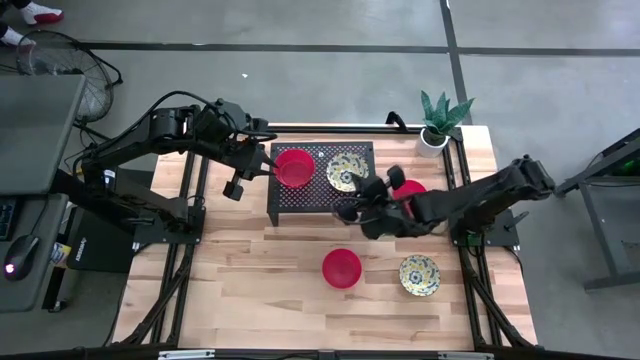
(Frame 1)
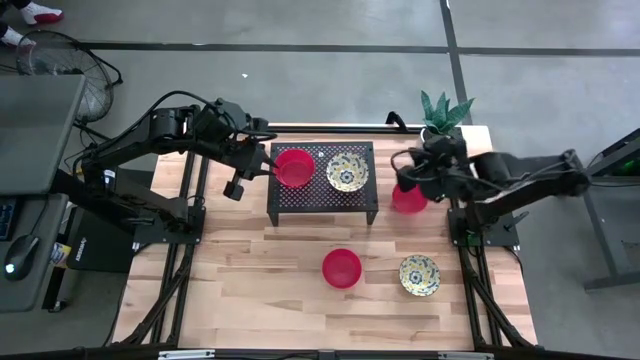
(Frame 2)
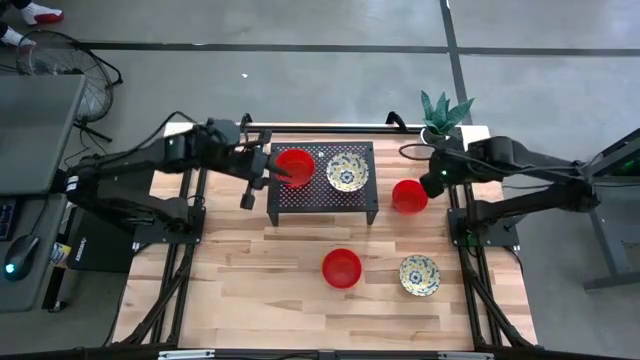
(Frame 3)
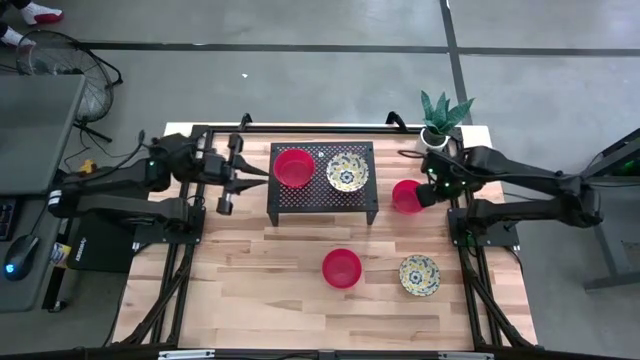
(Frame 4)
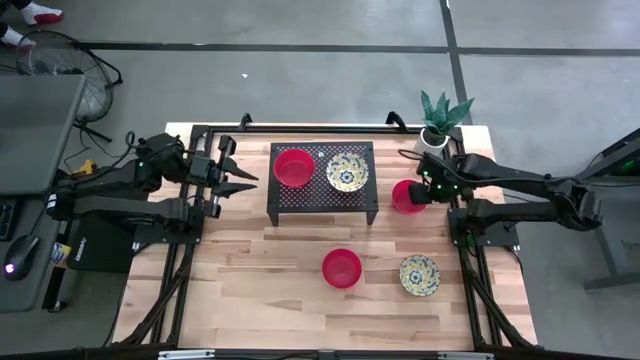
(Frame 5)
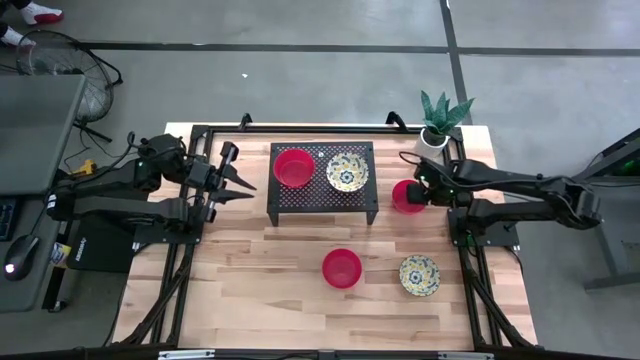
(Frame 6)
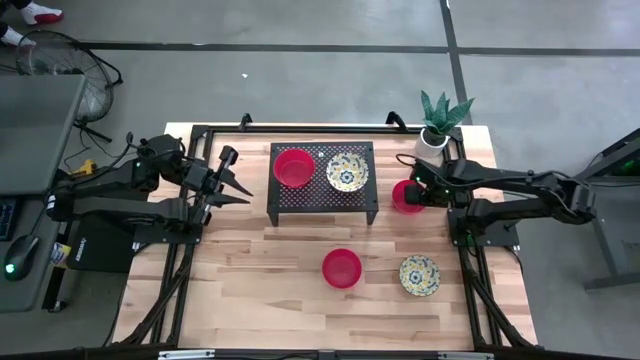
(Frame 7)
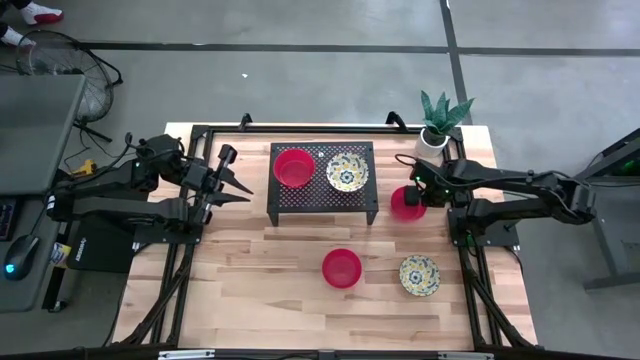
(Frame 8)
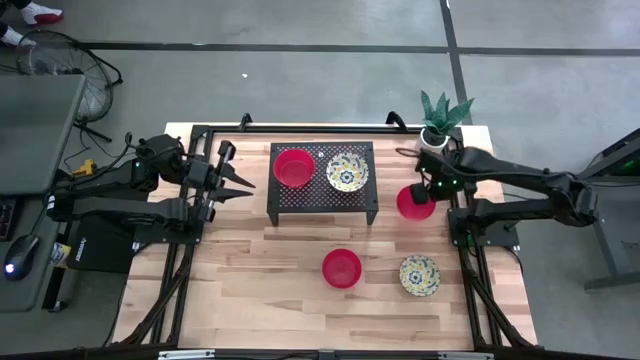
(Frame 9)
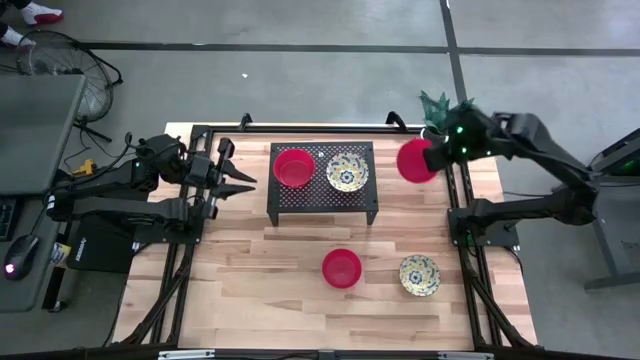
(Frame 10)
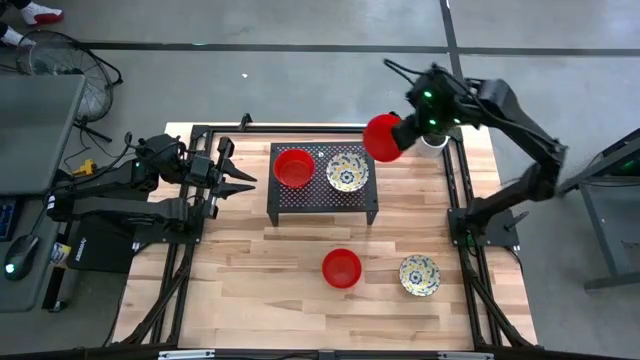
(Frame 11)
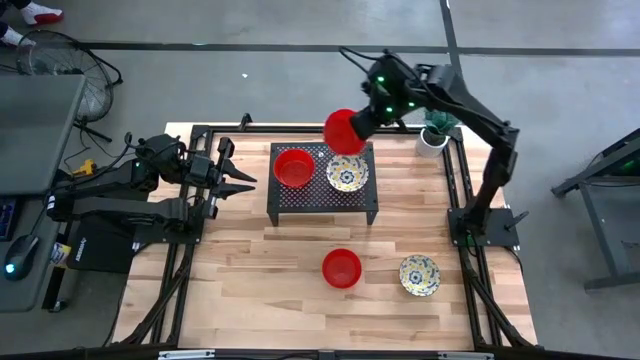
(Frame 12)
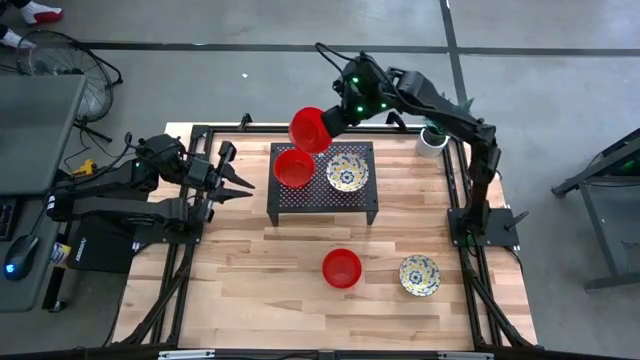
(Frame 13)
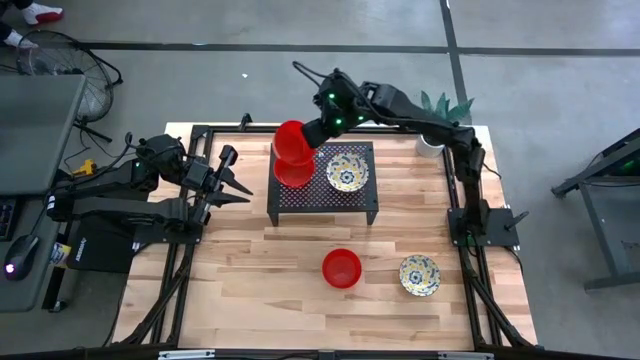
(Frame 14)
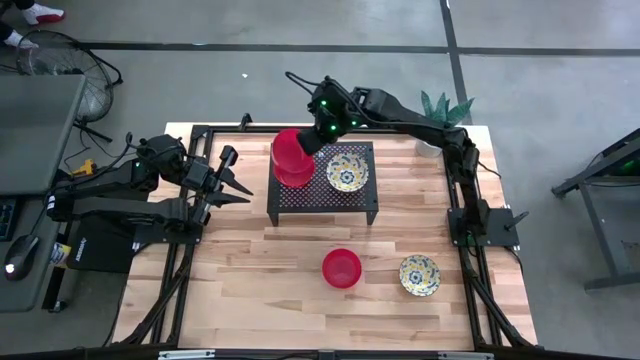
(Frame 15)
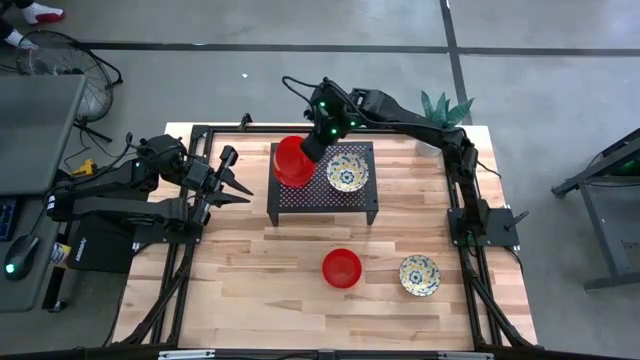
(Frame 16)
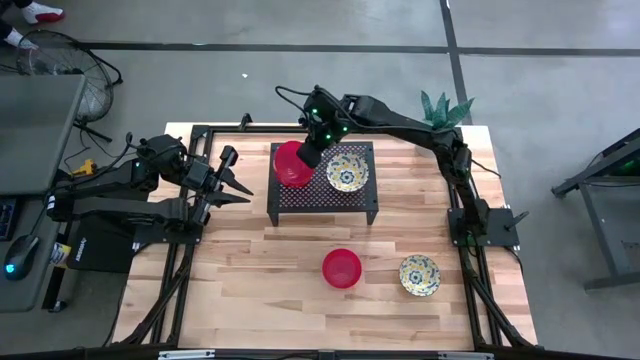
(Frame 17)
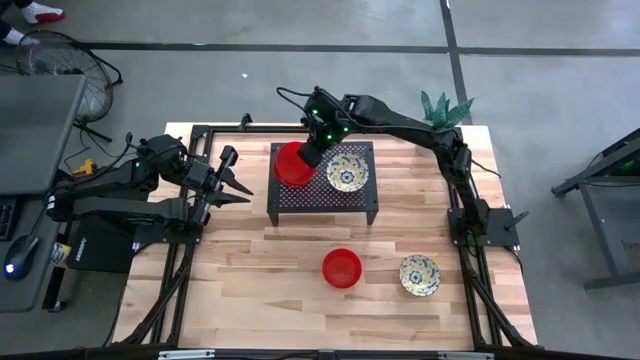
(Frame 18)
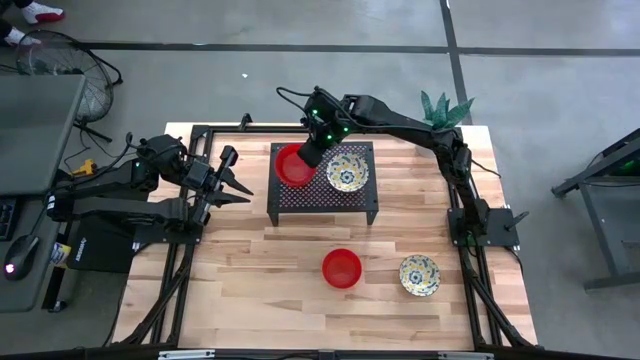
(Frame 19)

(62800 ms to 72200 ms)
Task: Pick & Place Mini bowls
Stack the top red bowl on top of the other red bowl on the shelf

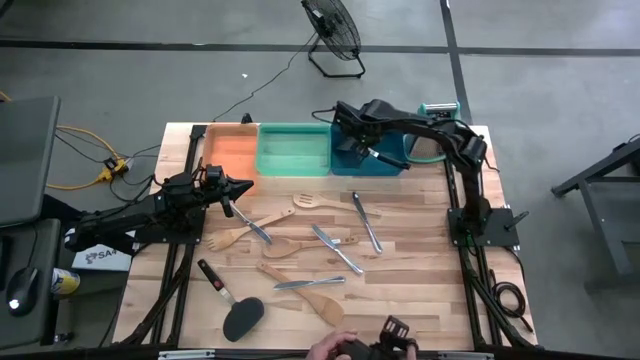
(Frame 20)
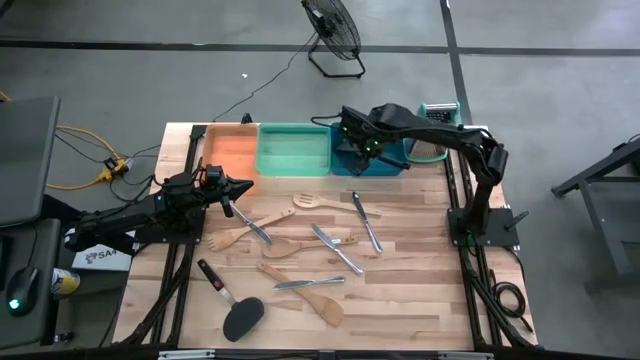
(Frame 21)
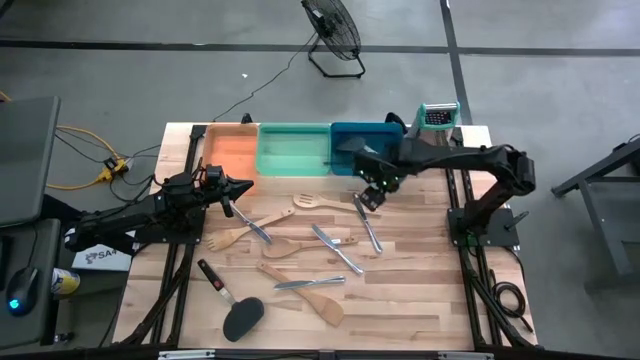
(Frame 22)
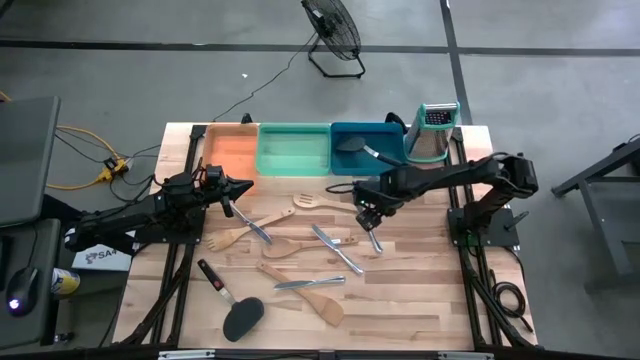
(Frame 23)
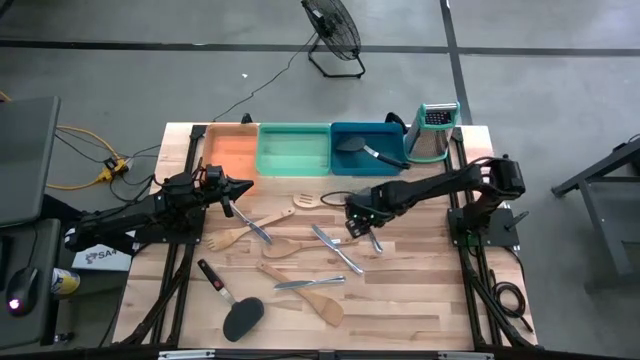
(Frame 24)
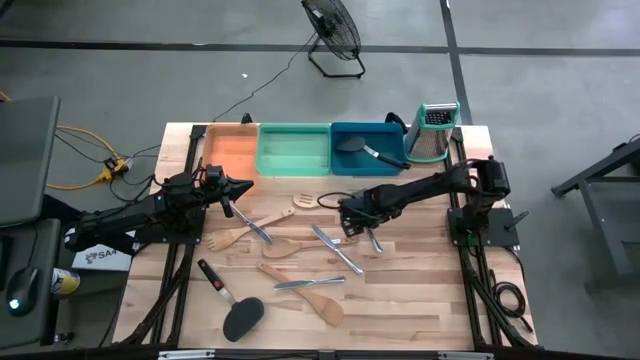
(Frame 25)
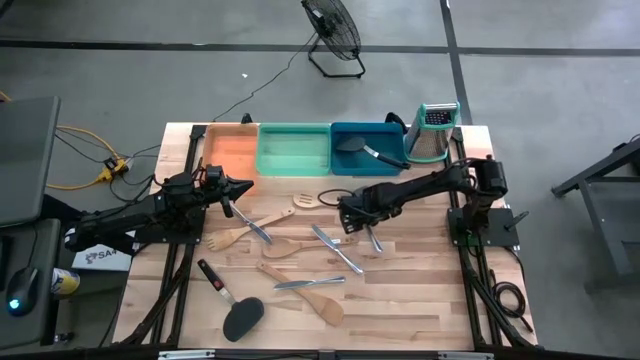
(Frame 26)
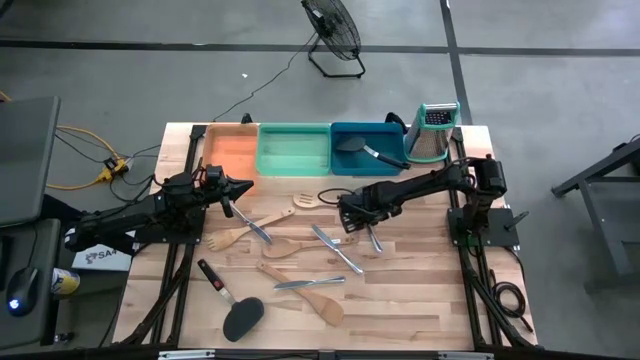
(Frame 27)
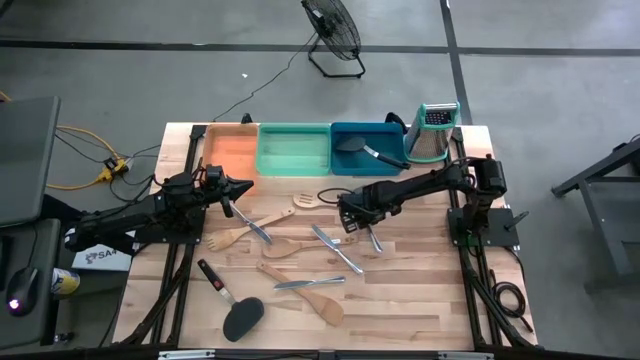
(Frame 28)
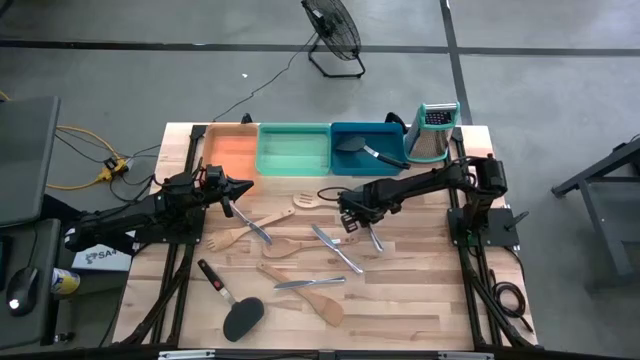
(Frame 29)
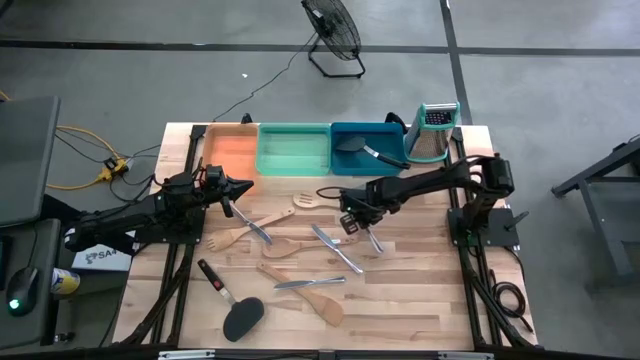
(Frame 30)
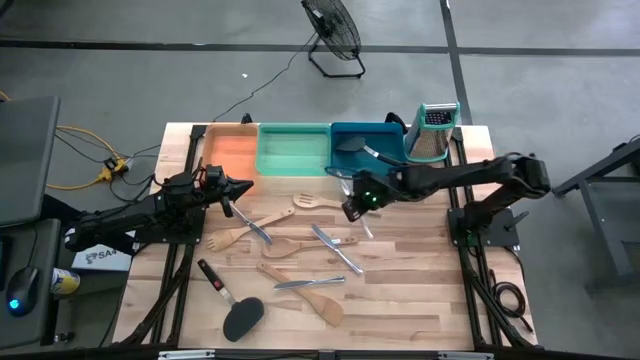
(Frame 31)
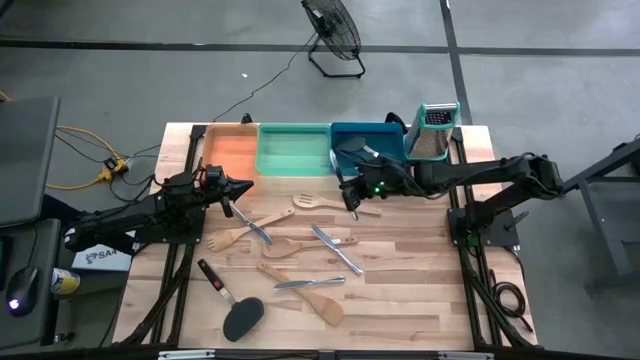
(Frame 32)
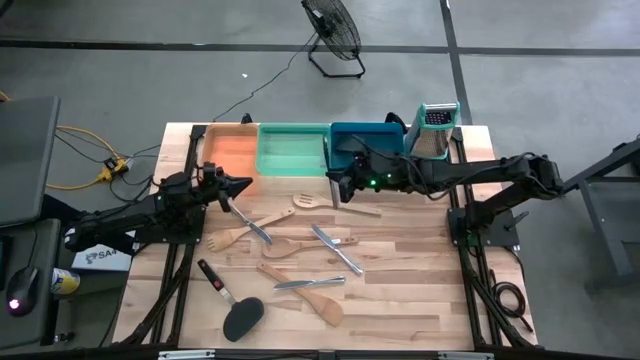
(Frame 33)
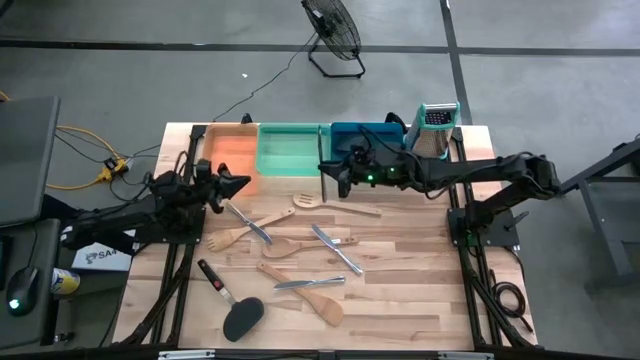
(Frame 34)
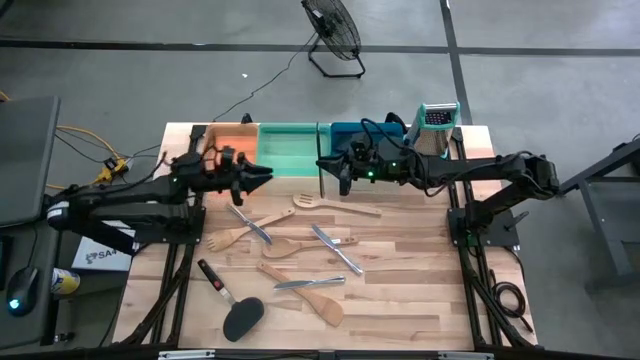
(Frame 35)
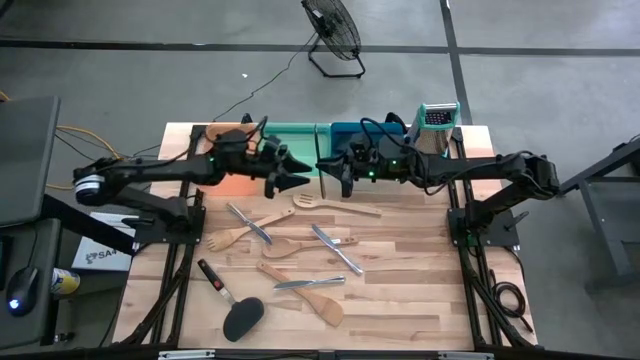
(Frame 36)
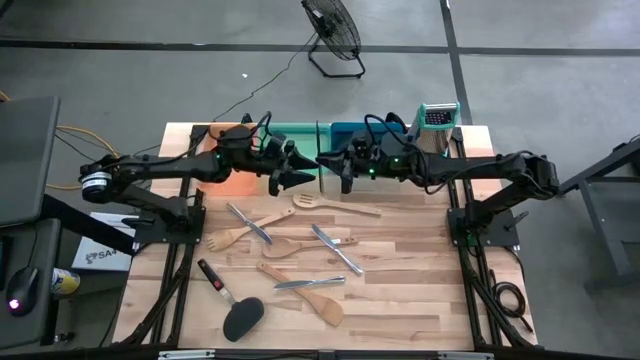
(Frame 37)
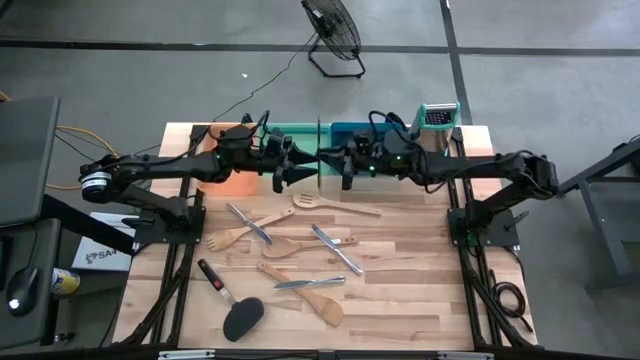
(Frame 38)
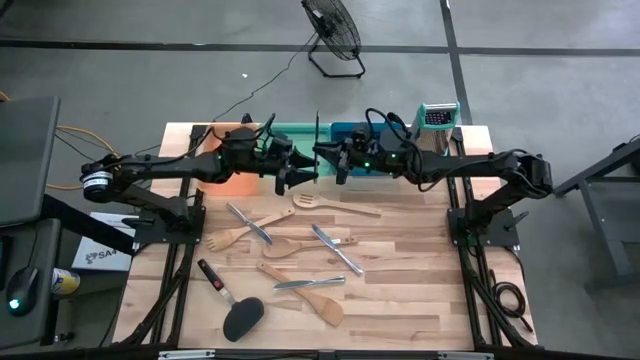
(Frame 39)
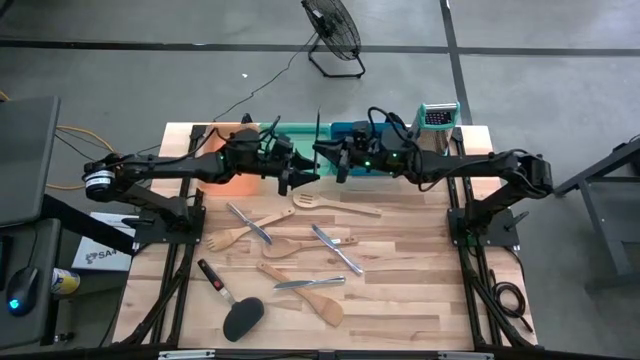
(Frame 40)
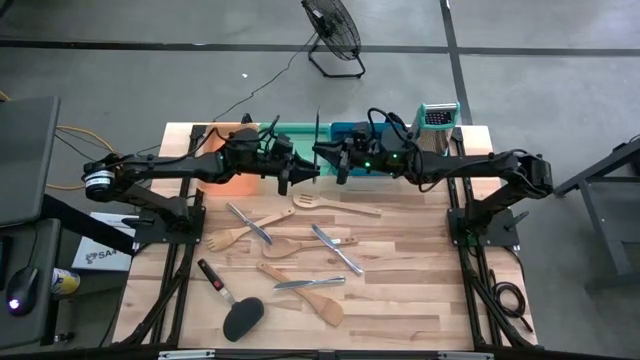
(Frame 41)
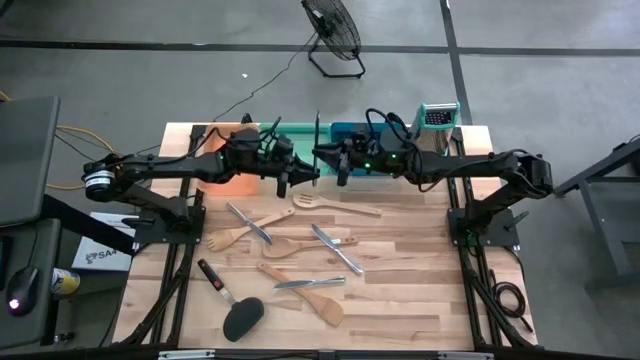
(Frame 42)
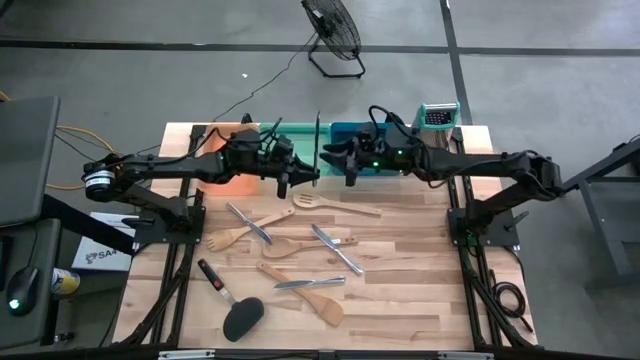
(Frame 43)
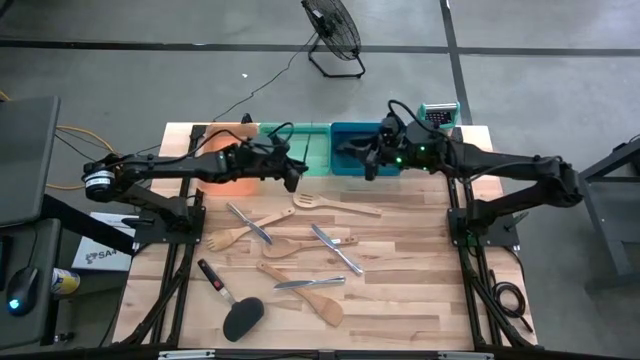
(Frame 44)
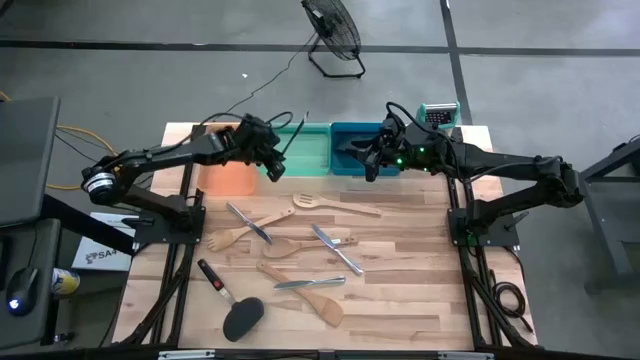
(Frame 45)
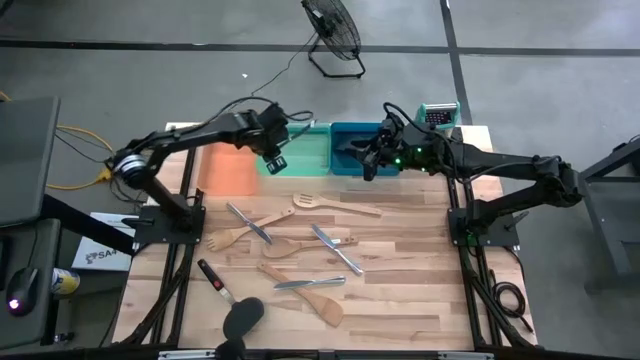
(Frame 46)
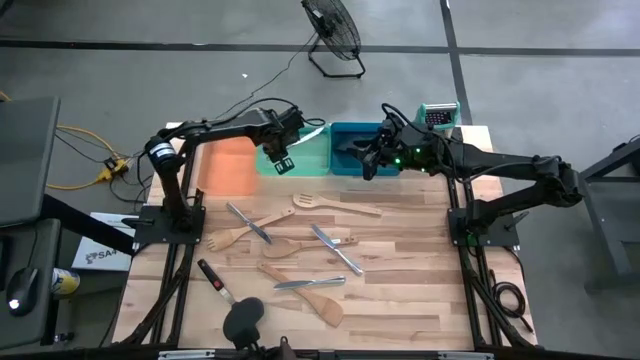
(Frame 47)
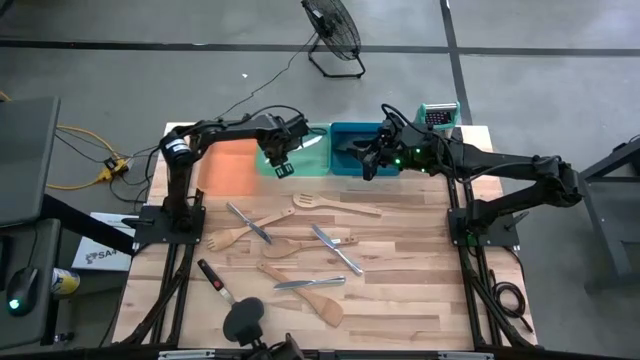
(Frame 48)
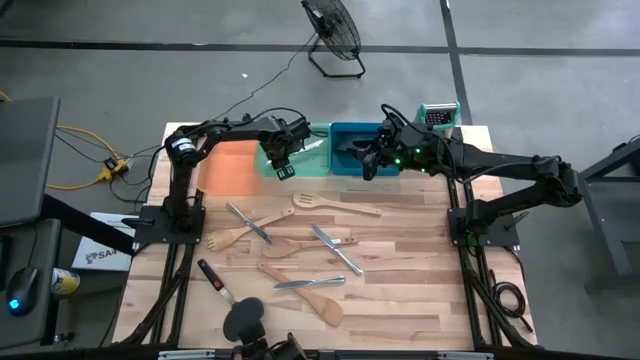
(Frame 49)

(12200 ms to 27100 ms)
Task: Pick & Place Kitchen Items
Put the silver table knife into the green bin
